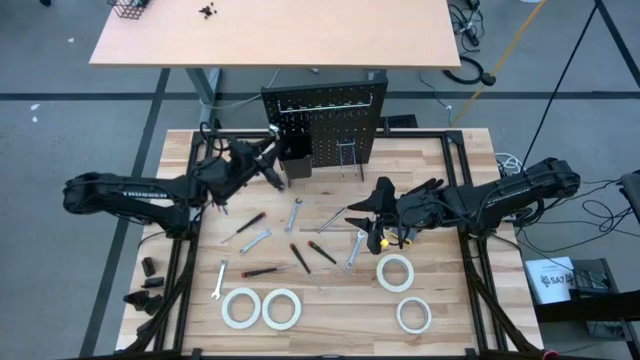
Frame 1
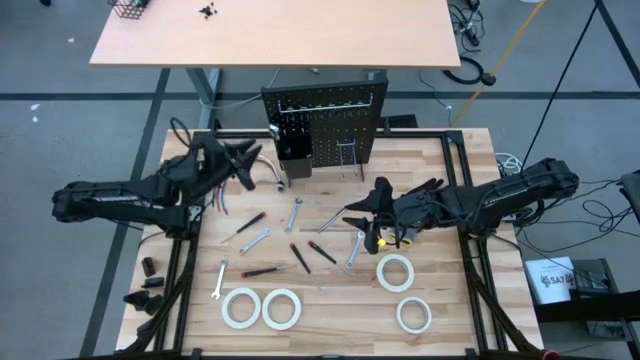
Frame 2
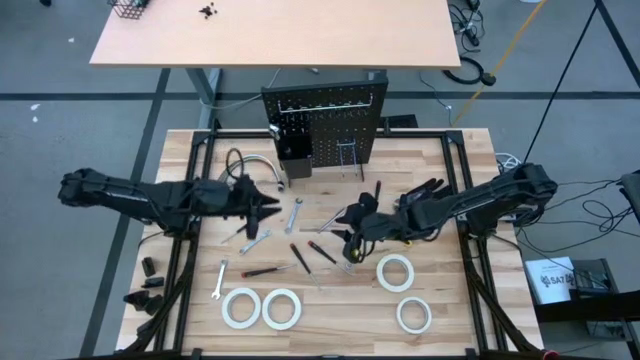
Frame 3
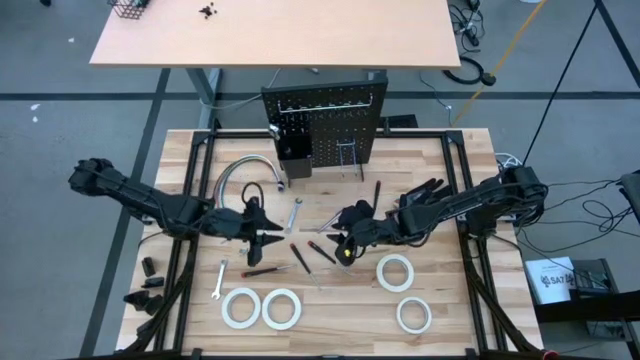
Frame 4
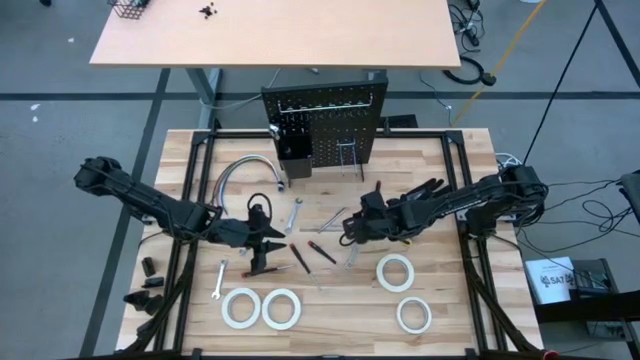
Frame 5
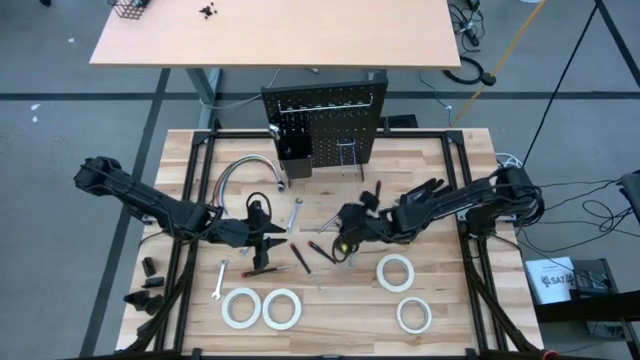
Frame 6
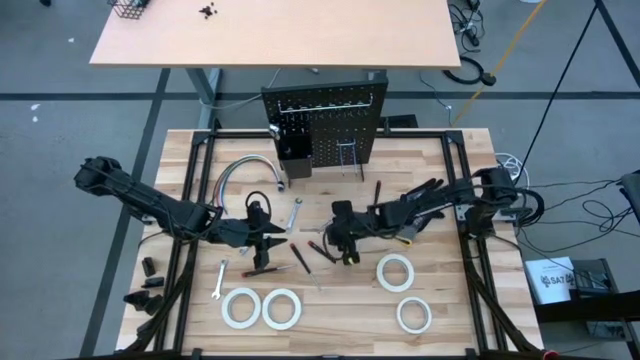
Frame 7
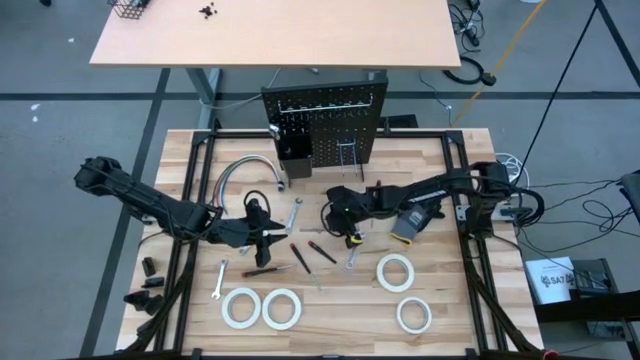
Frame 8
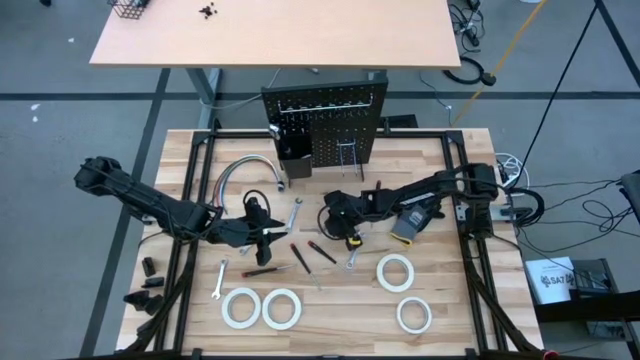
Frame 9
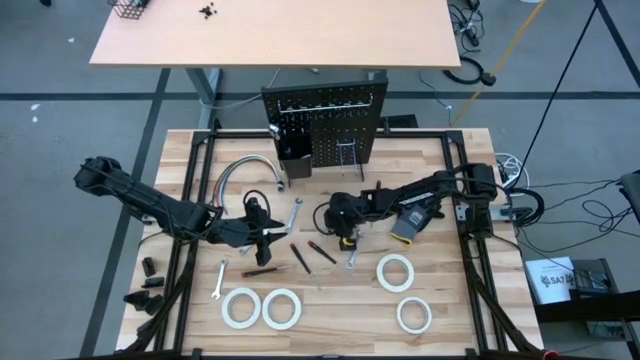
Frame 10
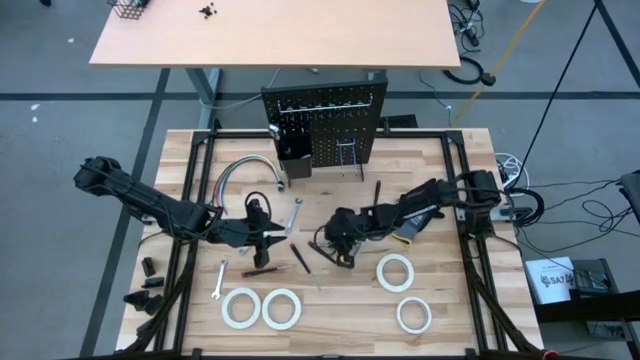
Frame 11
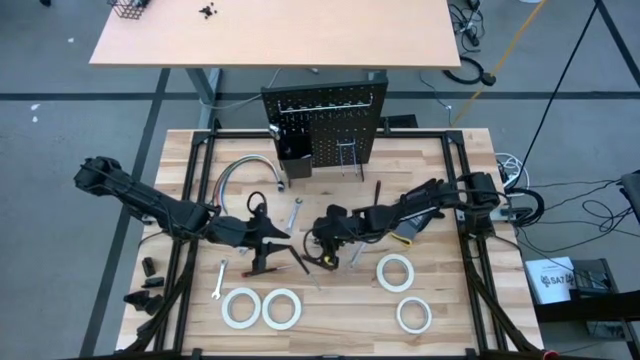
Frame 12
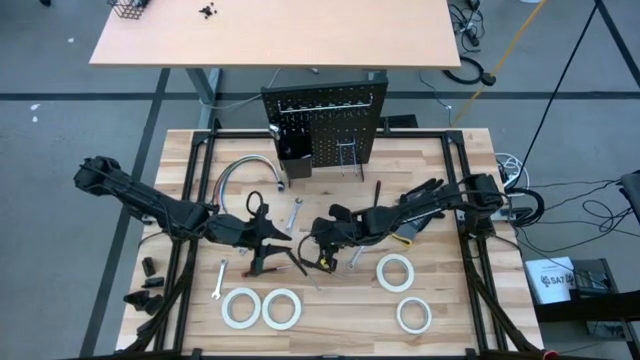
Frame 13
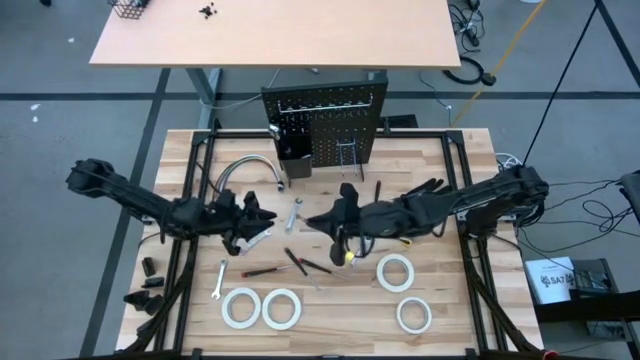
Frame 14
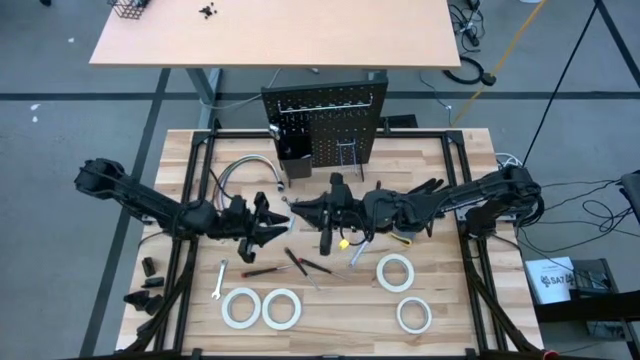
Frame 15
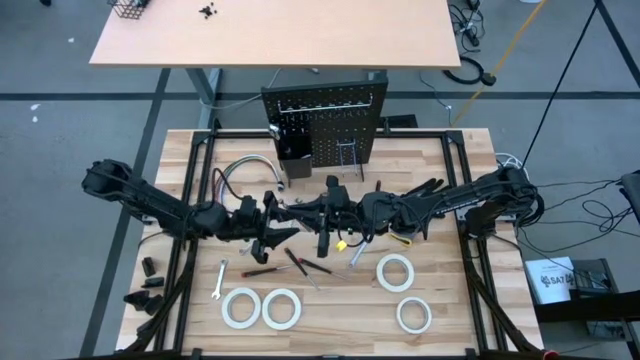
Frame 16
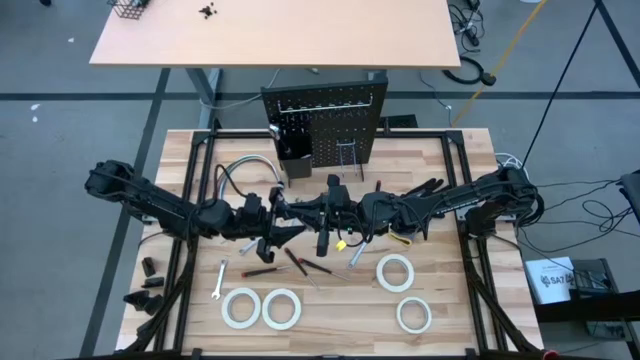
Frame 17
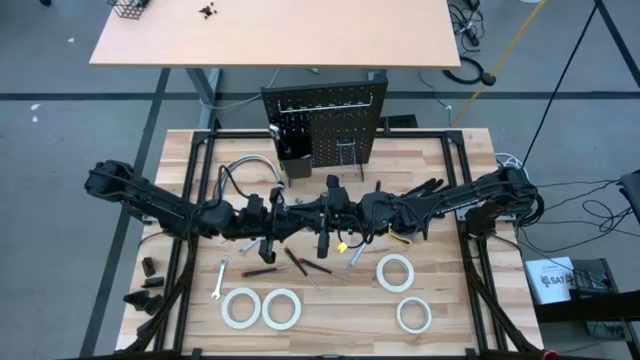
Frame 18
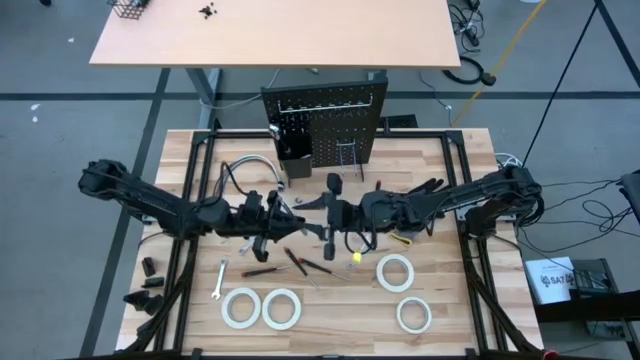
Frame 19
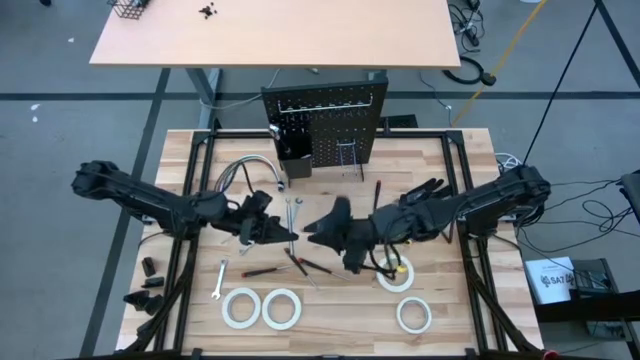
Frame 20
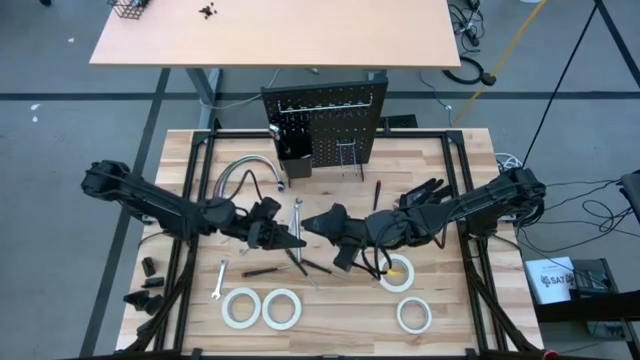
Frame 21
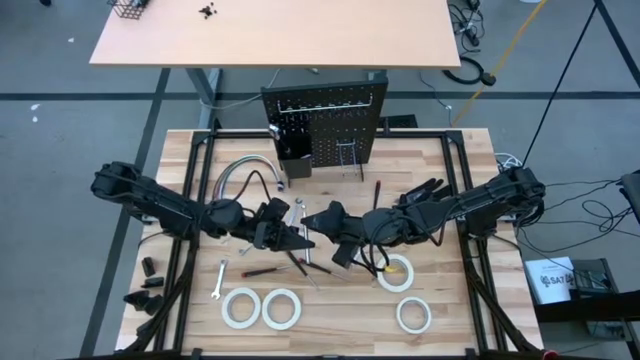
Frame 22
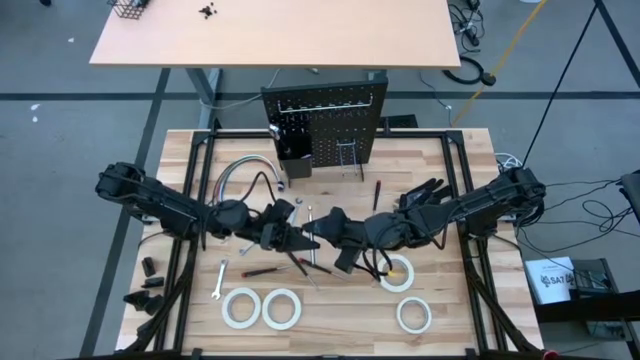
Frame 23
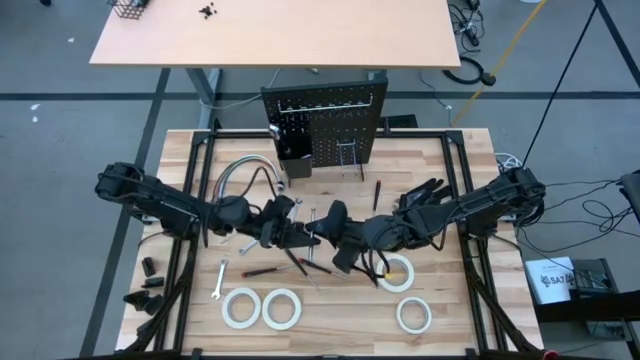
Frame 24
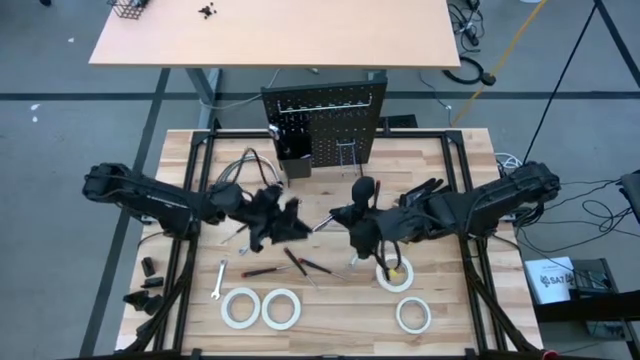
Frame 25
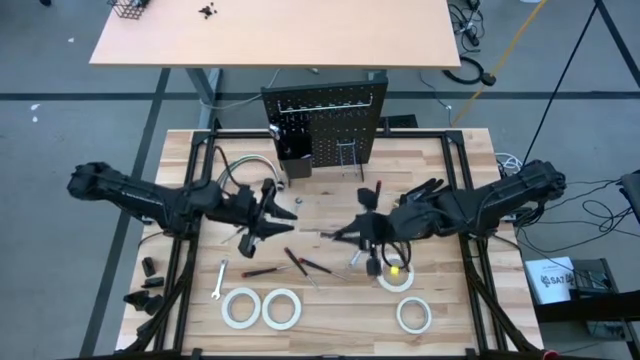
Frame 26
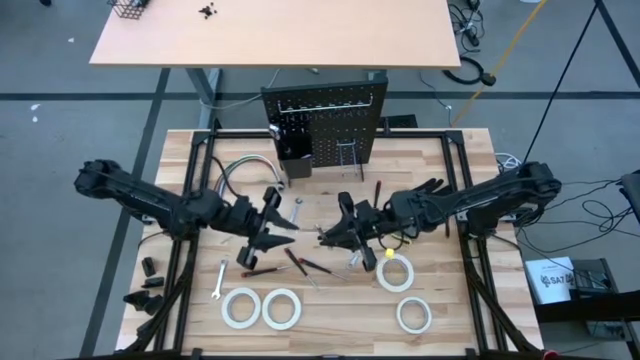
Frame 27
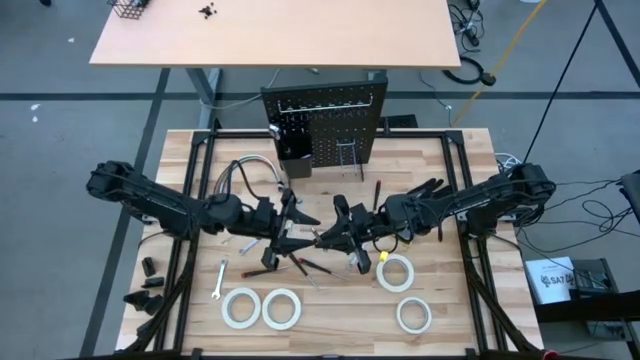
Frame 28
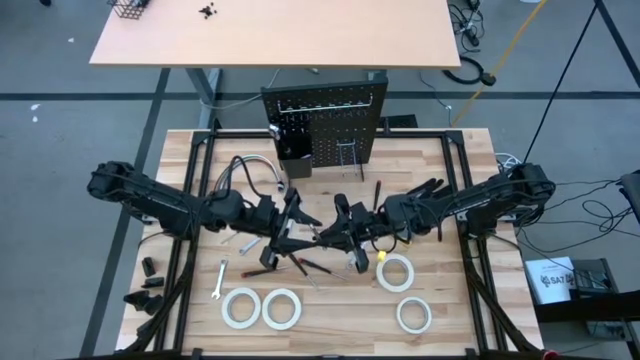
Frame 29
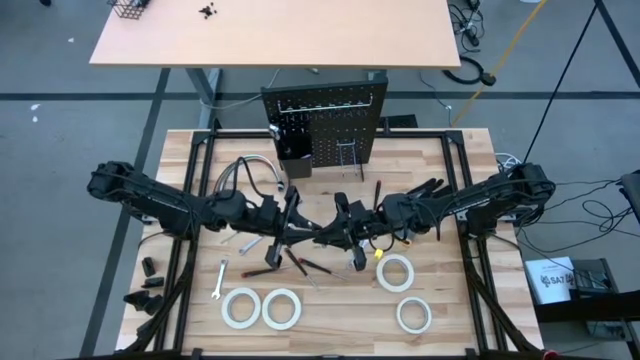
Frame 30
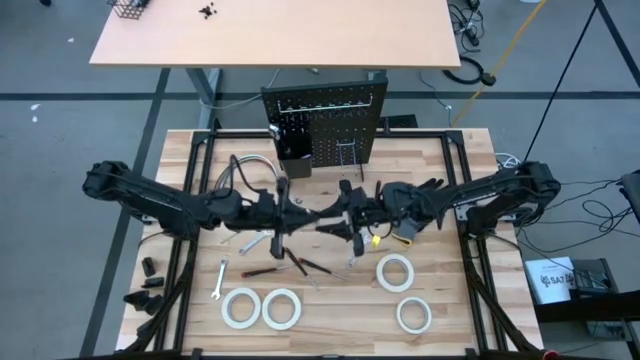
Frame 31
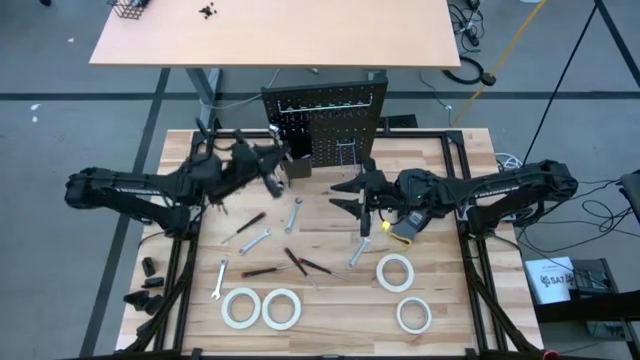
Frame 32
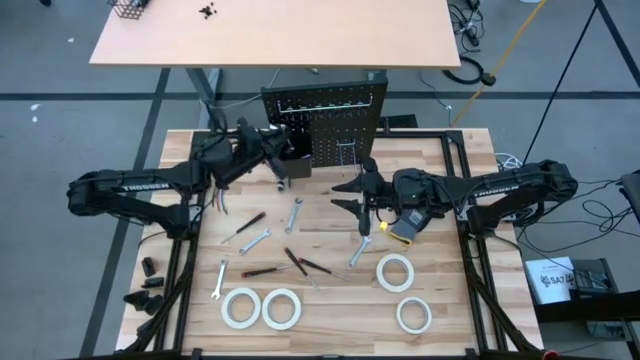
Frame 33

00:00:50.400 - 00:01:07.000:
Task: Hang tools onto peg board
Put the magnet pick up tool into the peg board

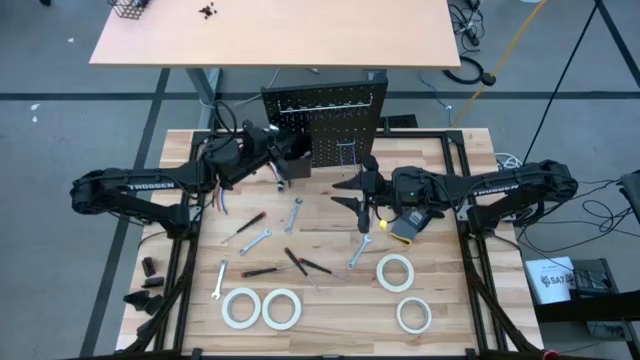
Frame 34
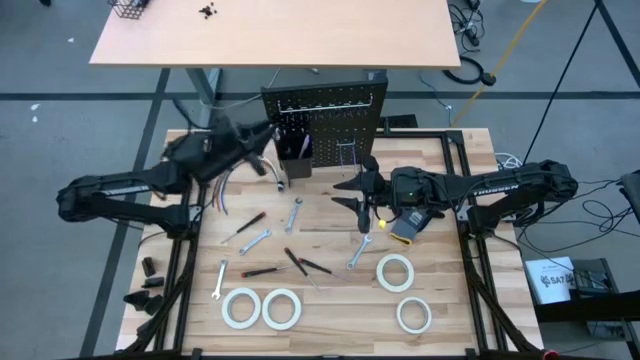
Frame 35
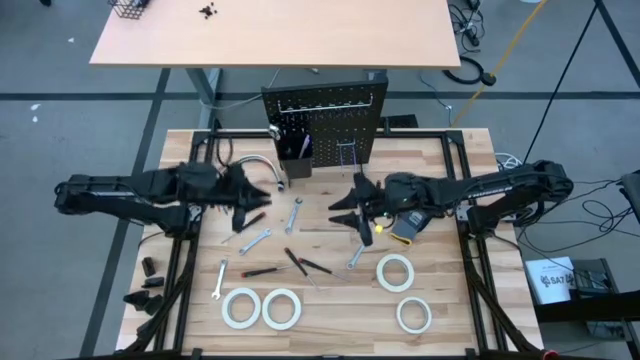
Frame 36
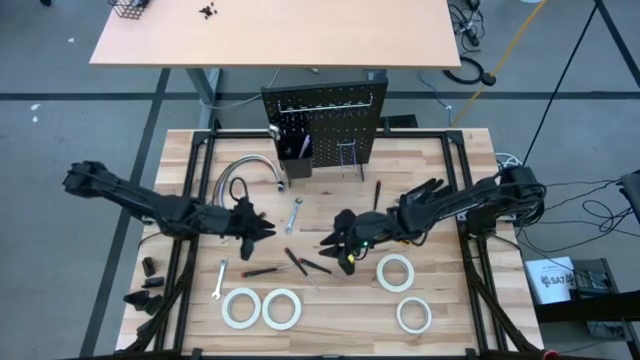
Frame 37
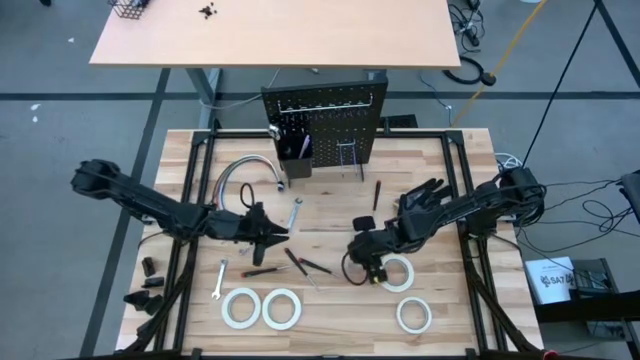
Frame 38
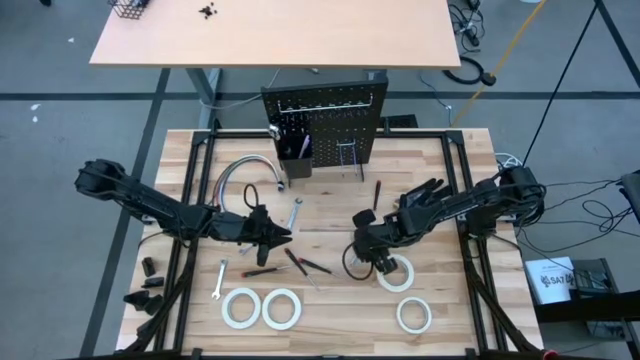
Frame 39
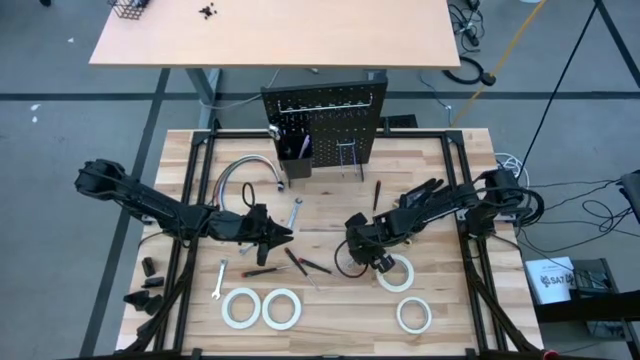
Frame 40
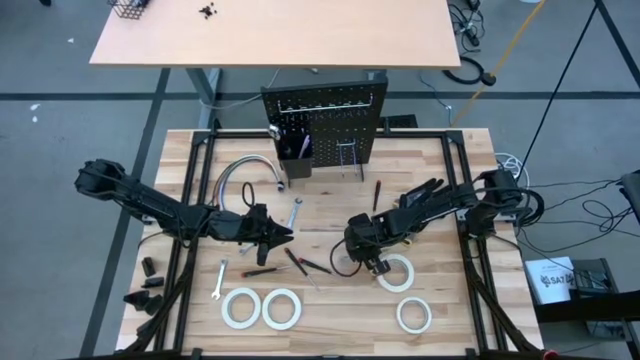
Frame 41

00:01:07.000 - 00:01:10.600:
Put the wrench into the peg board

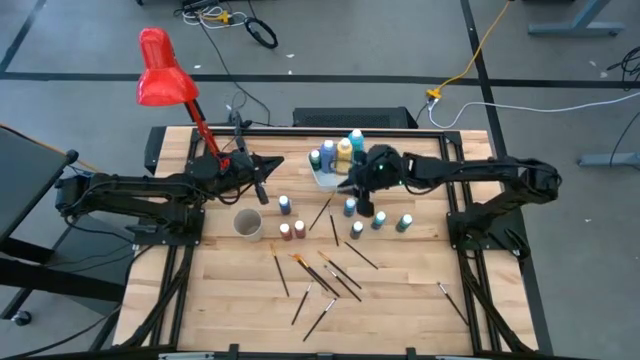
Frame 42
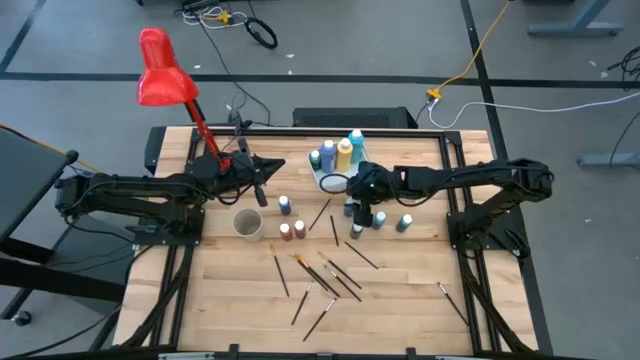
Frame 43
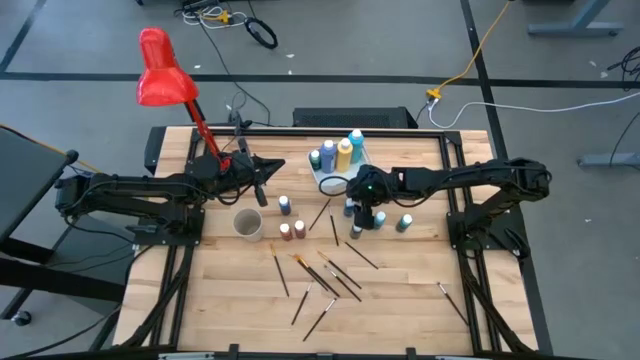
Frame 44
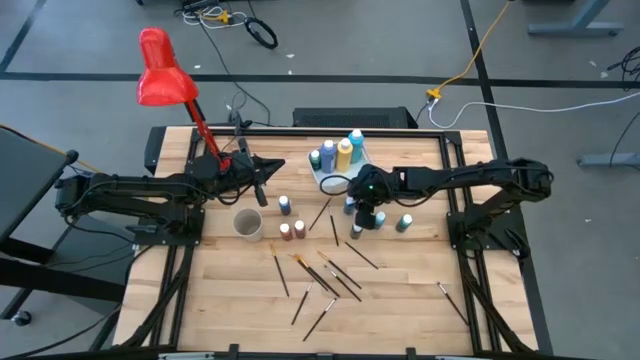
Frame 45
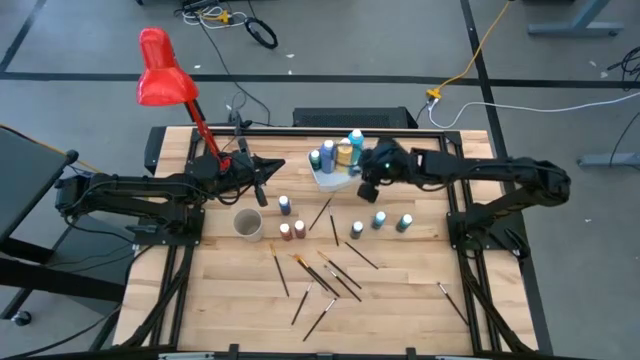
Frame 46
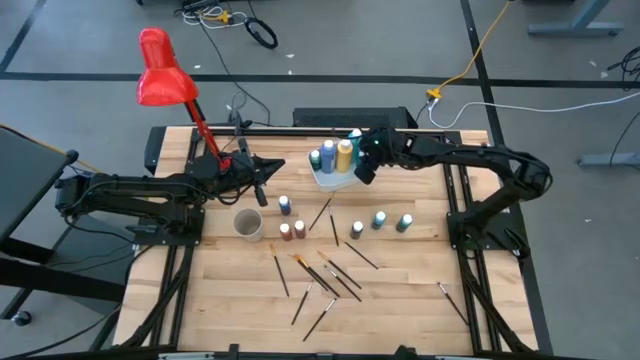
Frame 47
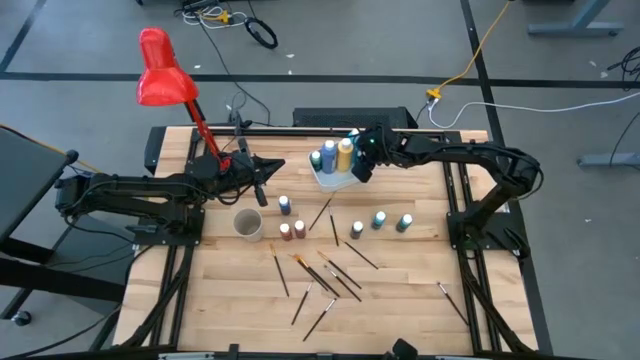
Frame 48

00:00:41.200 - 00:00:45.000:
Task: Pick & Place Paint Supplies
Put the small blue paint bottle into the white bin
